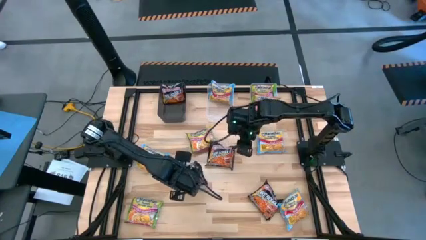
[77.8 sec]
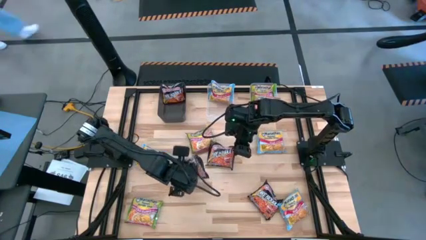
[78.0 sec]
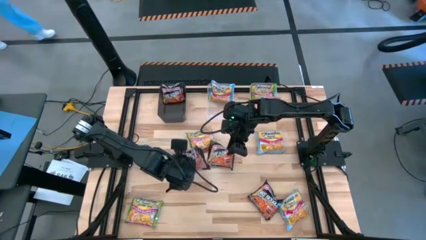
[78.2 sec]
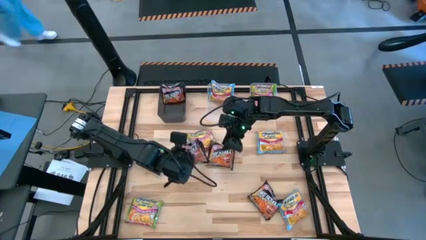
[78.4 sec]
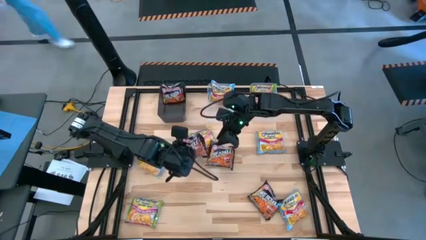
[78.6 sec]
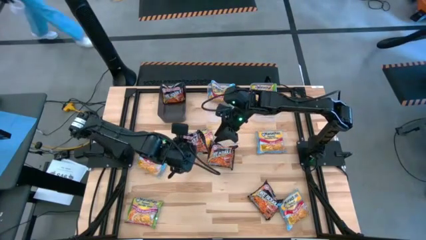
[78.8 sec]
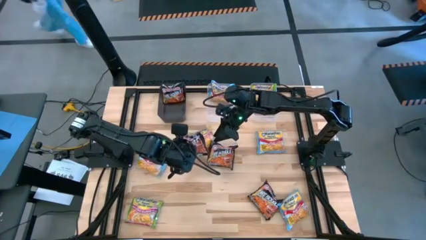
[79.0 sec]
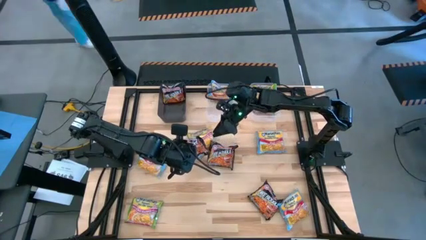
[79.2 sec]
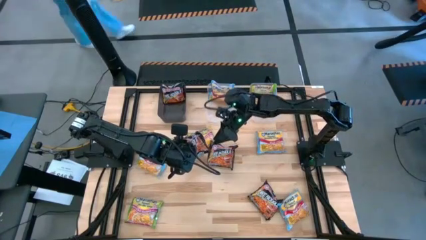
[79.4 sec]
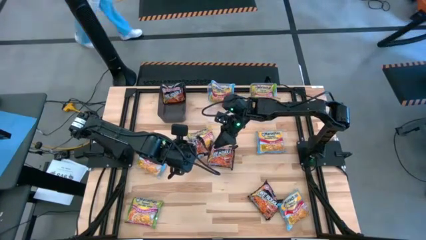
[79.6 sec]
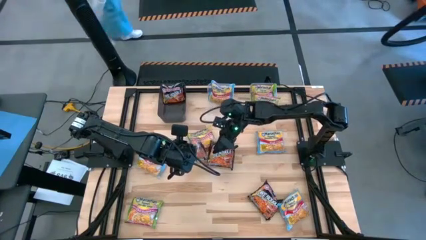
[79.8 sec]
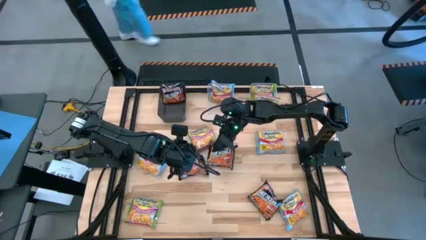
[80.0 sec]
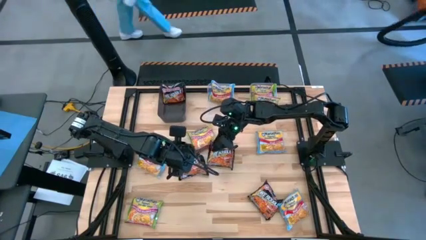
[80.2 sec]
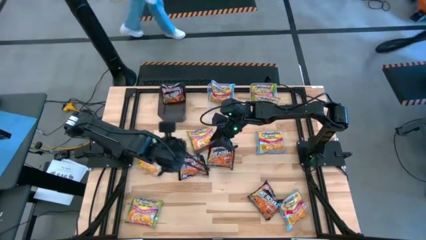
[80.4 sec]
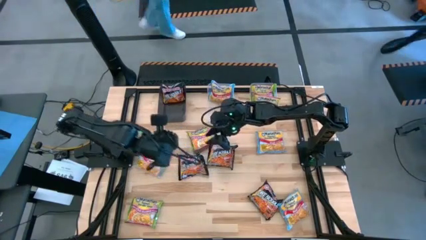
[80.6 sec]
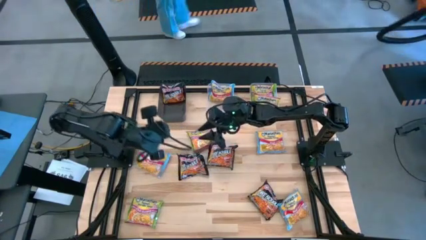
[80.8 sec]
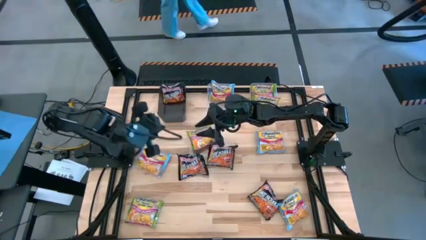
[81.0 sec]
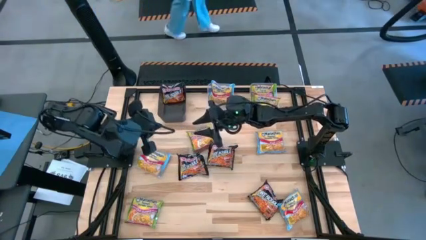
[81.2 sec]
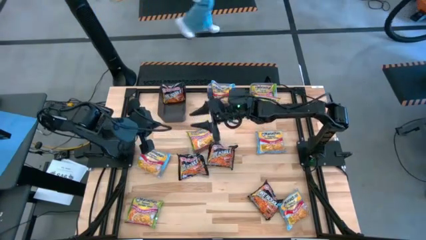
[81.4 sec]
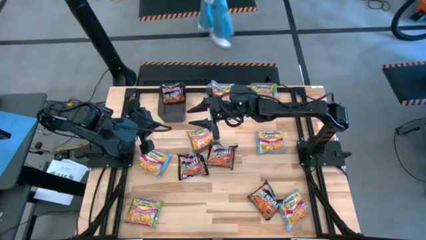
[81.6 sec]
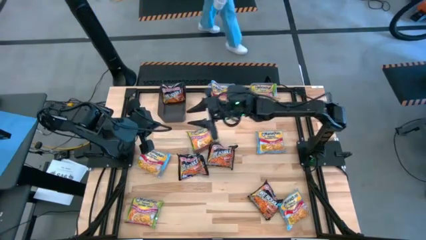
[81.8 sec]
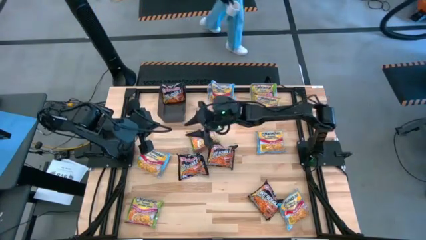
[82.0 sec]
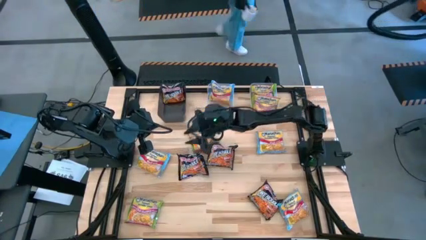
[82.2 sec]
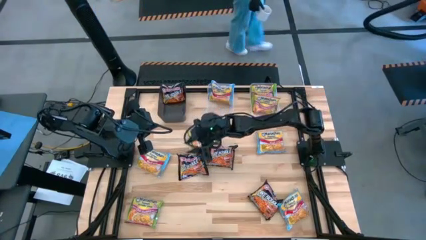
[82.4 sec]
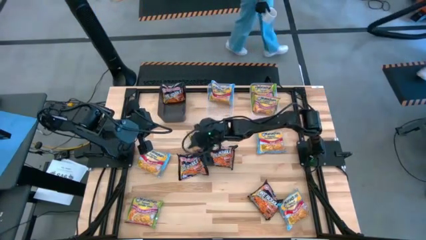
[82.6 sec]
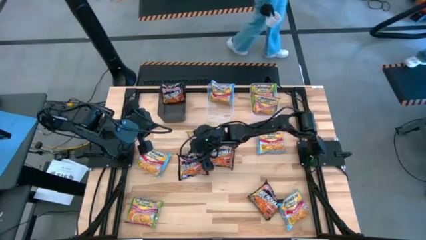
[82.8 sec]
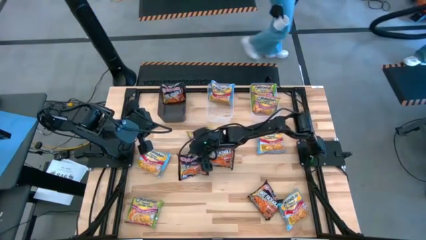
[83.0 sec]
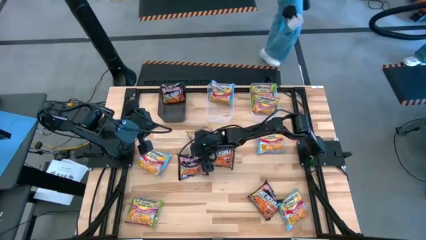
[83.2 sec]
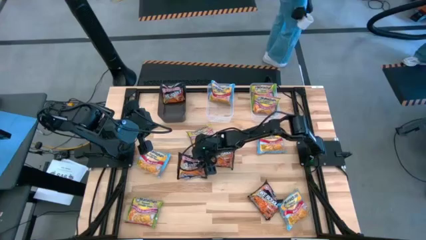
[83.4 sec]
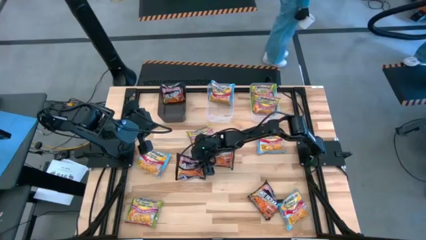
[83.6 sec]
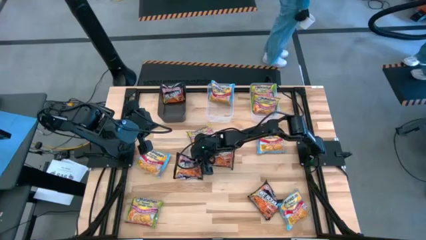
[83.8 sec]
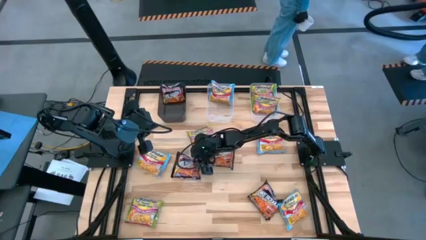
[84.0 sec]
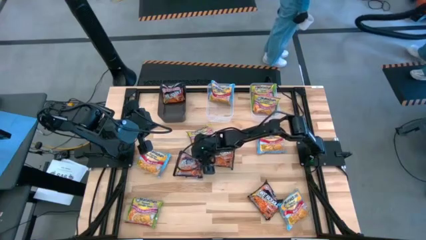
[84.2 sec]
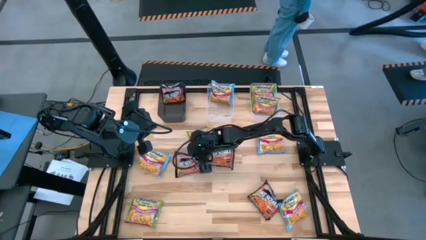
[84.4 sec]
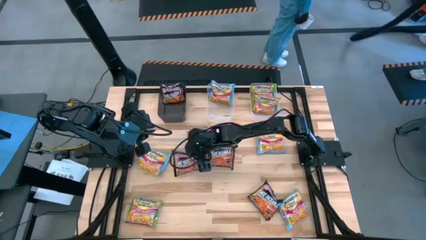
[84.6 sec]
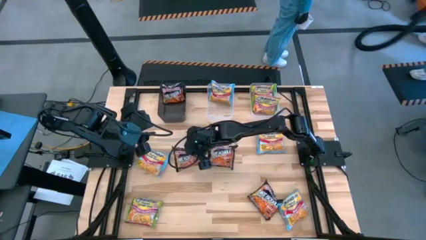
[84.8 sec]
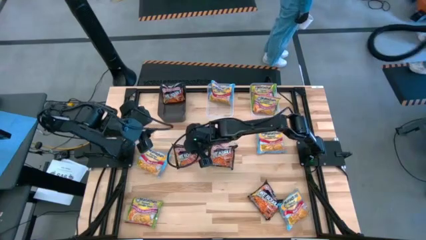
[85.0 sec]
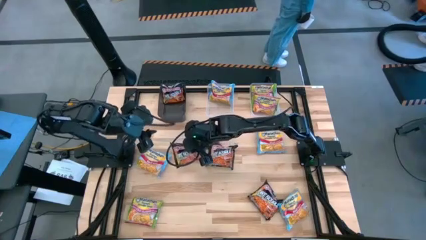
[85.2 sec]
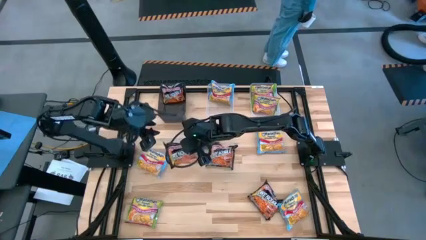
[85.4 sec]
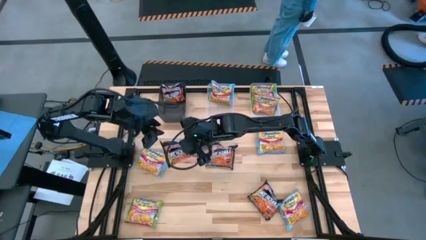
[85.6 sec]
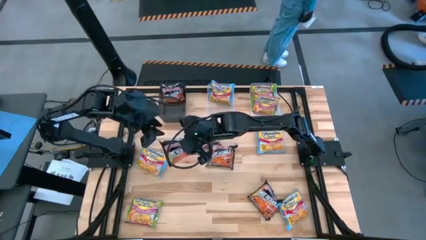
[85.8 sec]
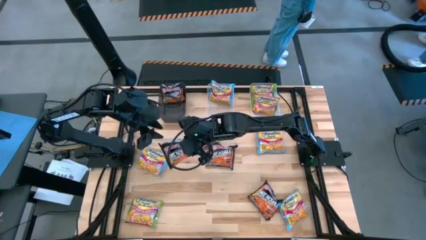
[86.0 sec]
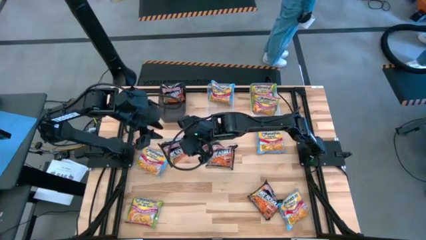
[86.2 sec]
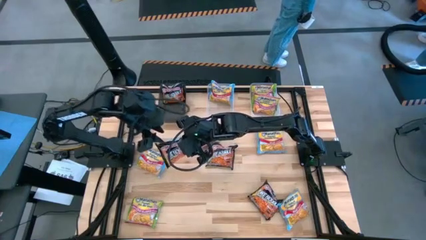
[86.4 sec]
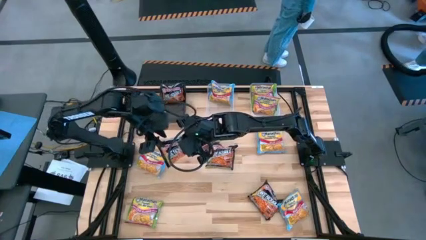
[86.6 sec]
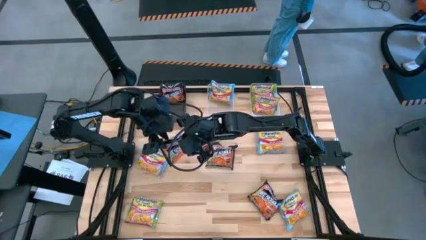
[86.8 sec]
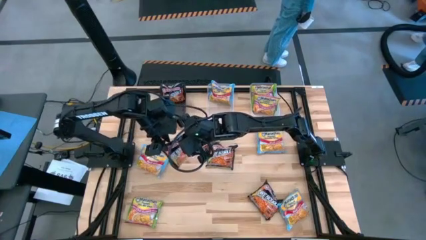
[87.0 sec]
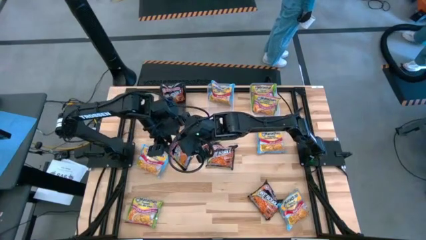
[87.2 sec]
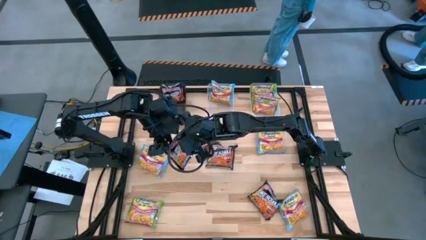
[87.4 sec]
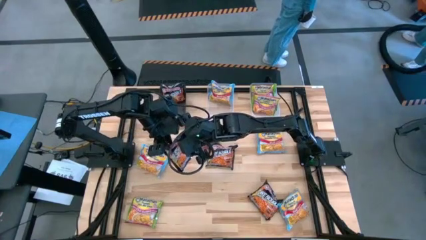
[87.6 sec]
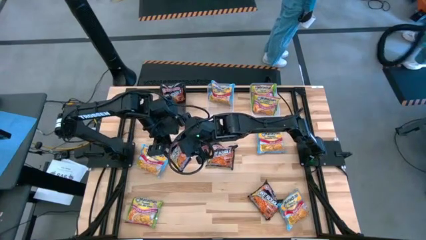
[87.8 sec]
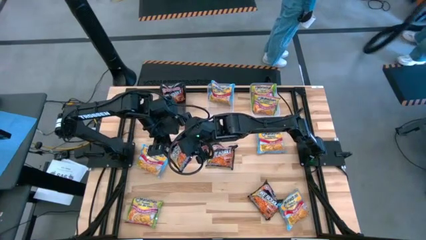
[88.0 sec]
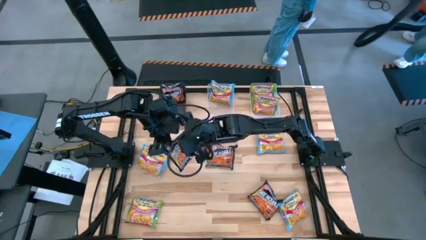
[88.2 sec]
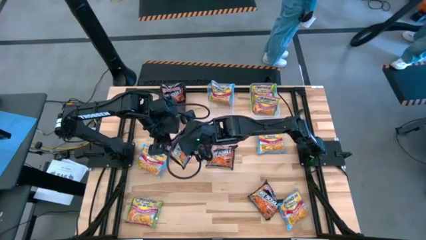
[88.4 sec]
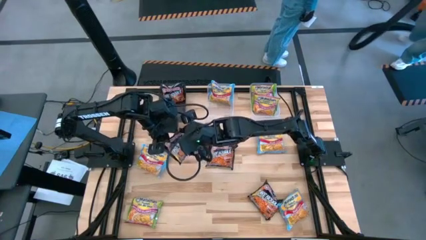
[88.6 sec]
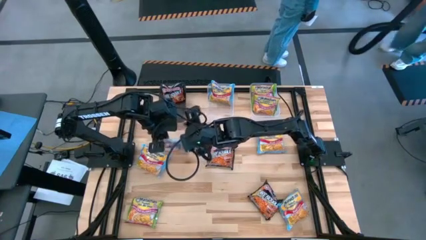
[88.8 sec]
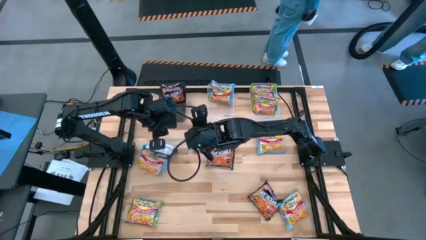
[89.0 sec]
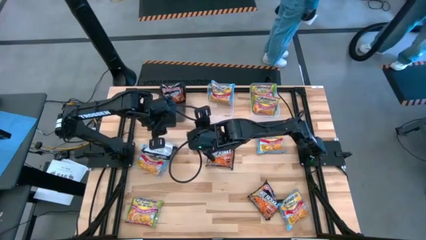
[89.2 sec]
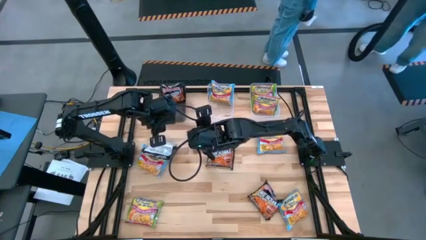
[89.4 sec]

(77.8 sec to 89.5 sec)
Task: Sort Maruchan noodles
Put the bottom left black noodle pack into the black bin

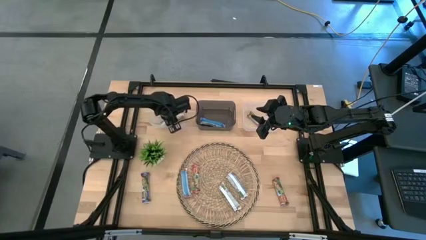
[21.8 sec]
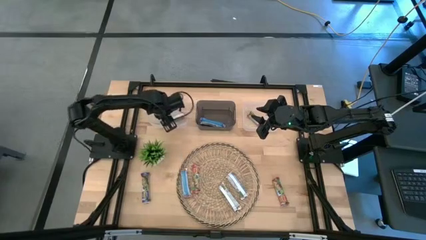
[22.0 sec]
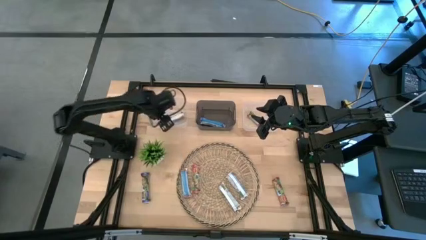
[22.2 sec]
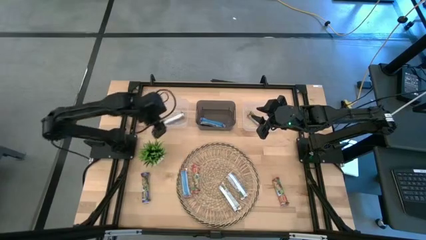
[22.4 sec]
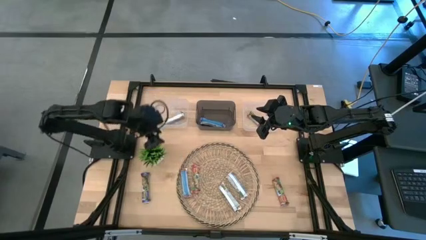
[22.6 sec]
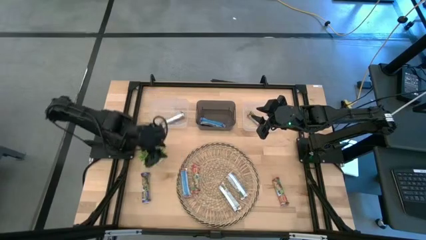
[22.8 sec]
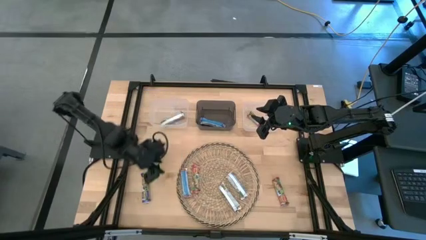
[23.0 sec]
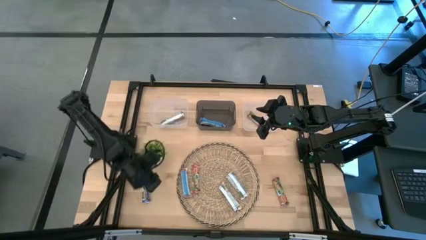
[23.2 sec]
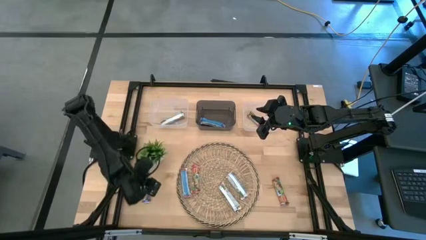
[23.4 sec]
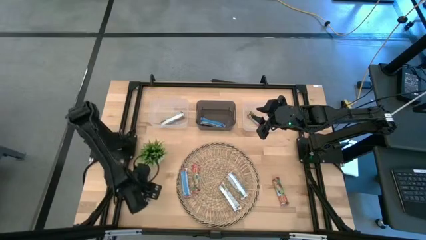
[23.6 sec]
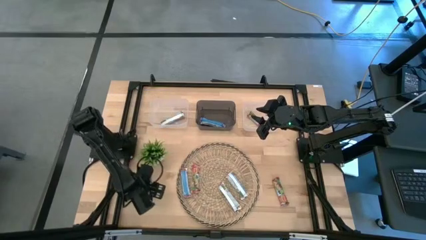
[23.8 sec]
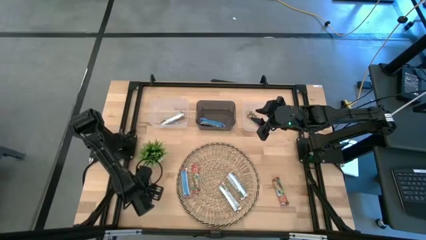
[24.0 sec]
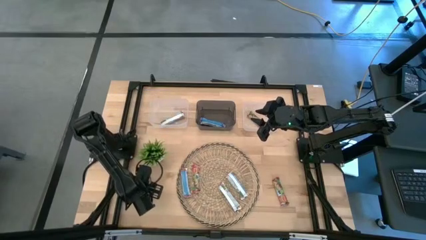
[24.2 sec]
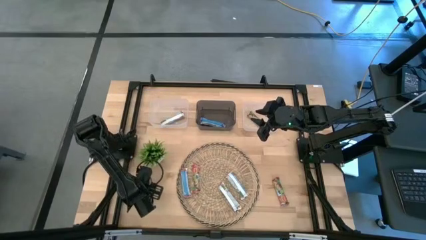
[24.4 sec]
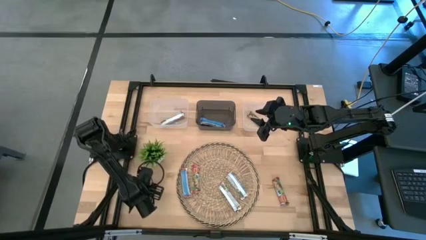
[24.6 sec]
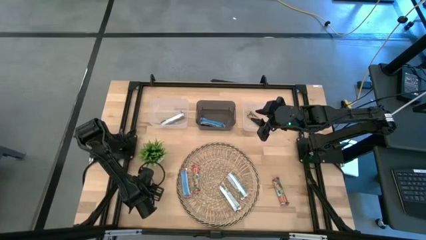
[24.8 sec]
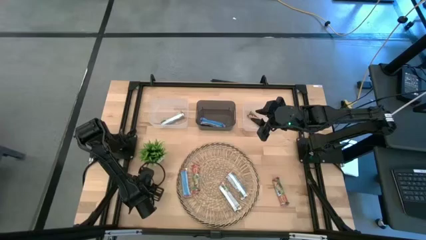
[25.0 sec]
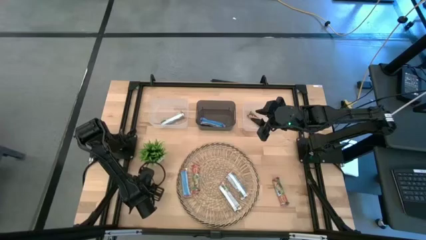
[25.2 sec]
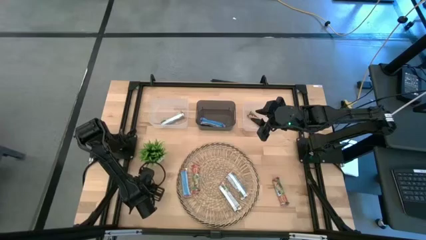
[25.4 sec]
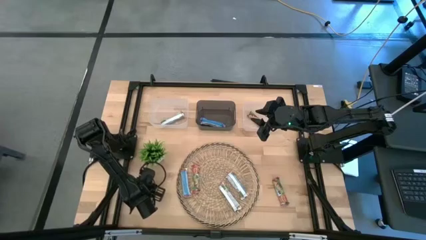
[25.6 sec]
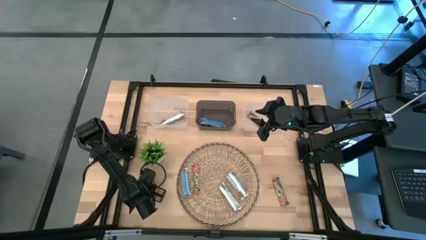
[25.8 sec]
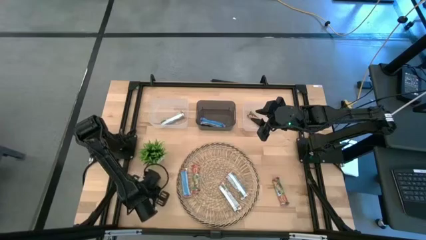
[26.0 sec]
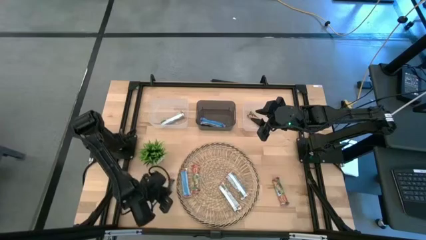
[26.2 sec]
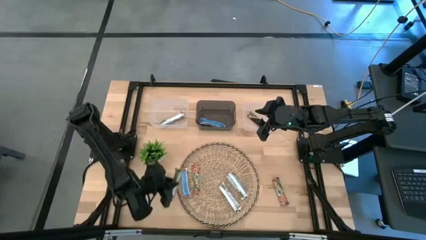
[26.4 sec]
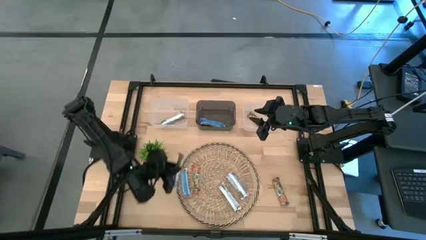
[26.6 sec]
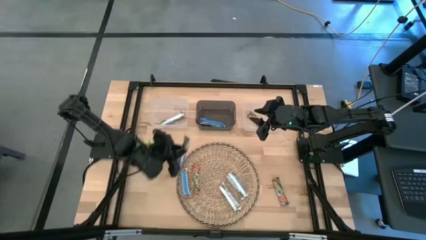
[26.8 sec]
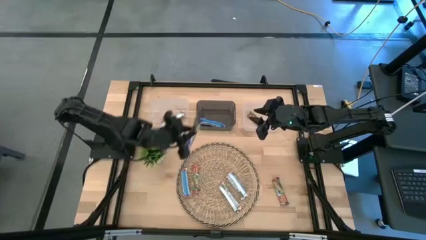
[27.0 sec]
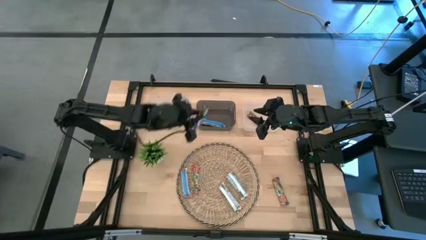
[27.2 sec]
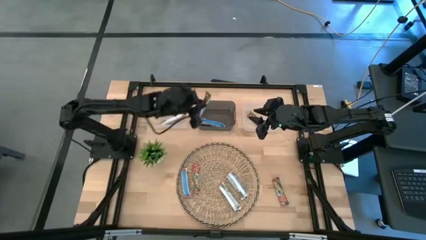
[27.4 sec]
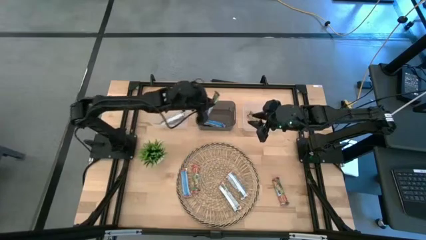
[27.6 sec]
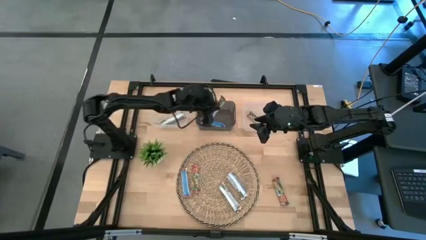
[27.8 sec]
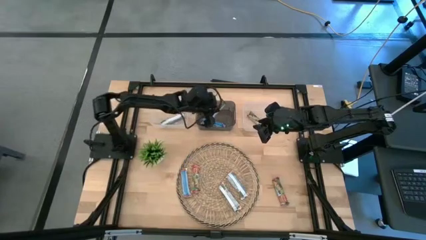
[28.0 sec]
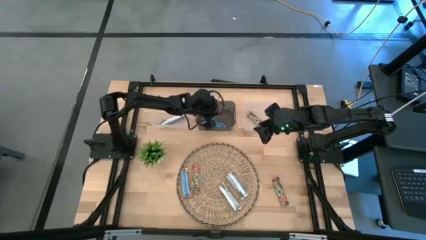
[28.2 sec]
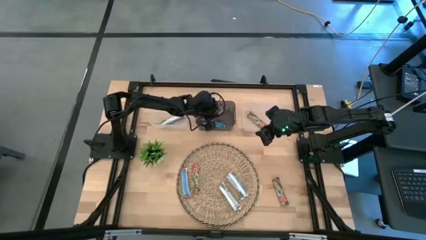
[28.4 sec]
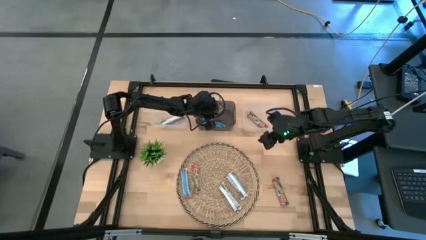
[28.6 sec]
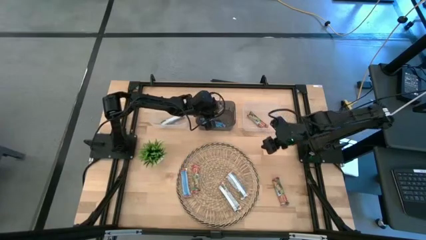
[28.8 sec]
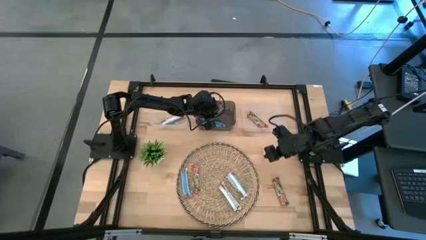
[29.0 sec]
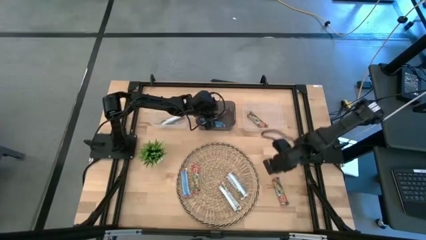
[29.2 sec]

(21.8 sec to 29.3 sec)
Task: Pick and place Granola Bars by type
Put the blue granola bar into the black bin
